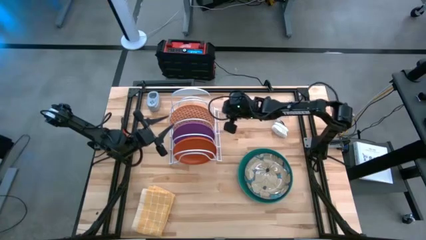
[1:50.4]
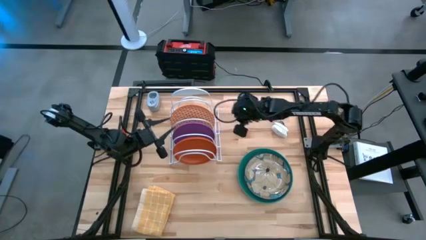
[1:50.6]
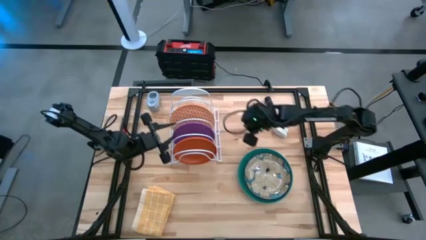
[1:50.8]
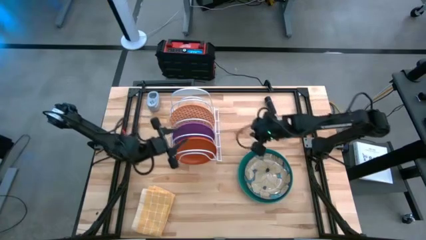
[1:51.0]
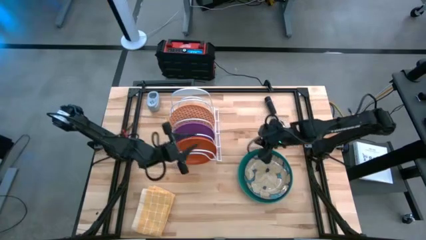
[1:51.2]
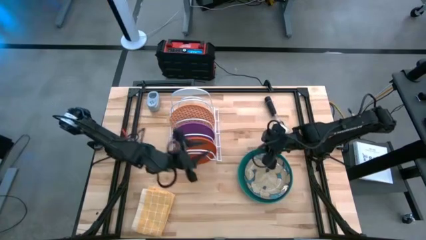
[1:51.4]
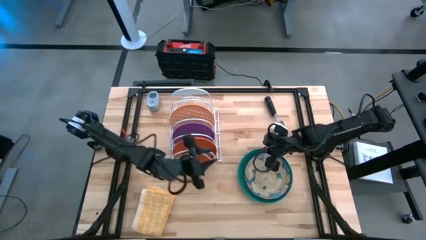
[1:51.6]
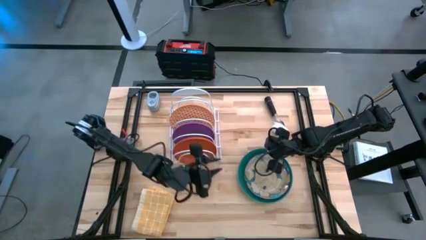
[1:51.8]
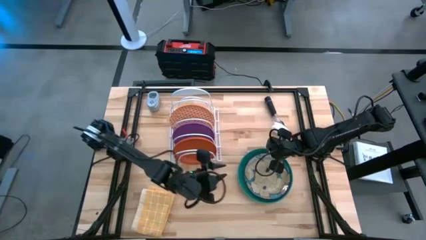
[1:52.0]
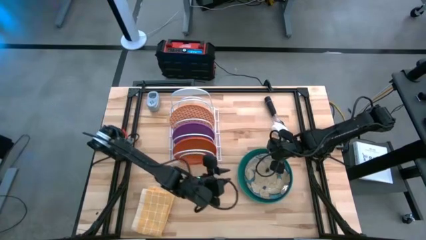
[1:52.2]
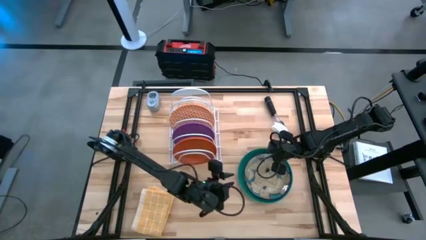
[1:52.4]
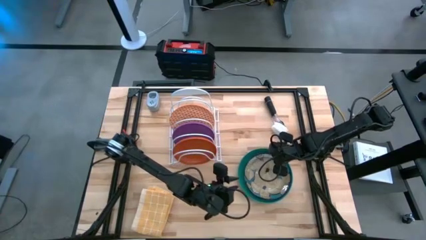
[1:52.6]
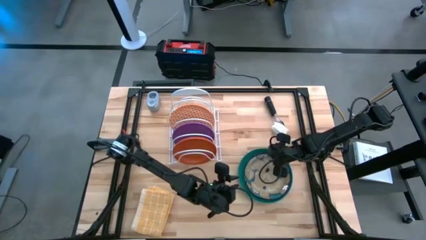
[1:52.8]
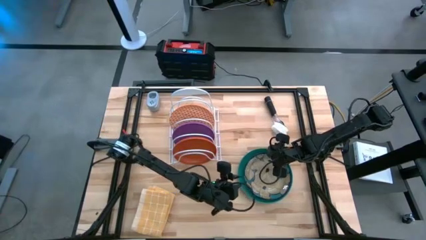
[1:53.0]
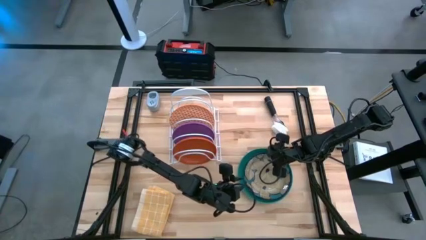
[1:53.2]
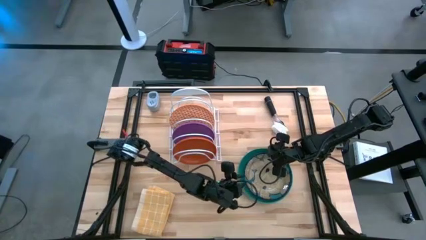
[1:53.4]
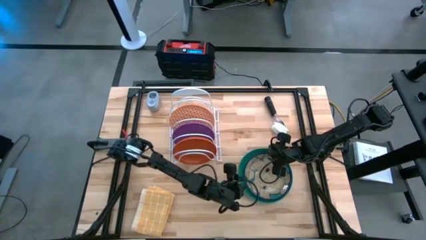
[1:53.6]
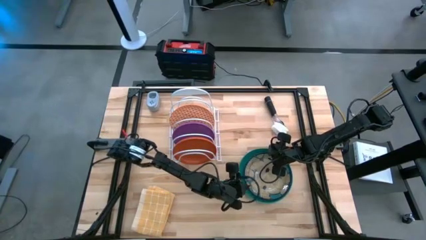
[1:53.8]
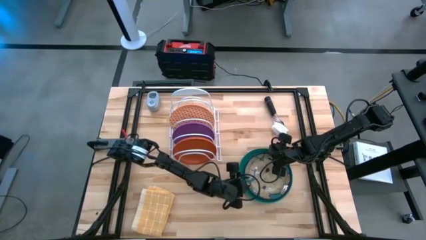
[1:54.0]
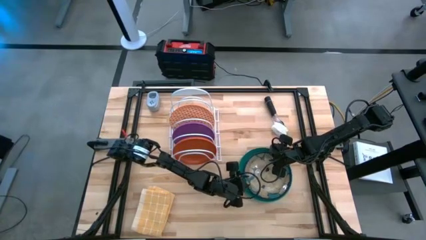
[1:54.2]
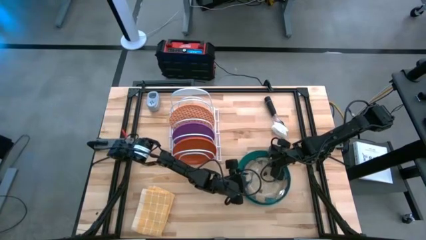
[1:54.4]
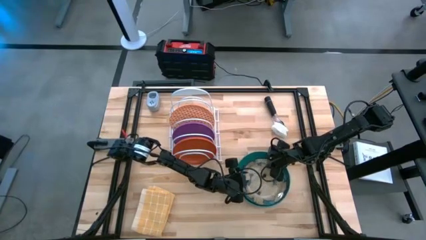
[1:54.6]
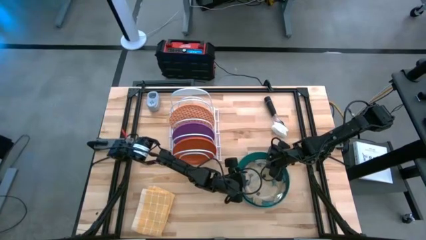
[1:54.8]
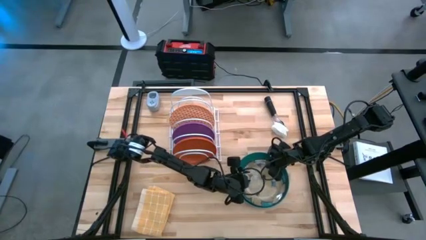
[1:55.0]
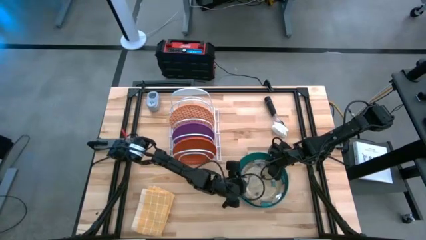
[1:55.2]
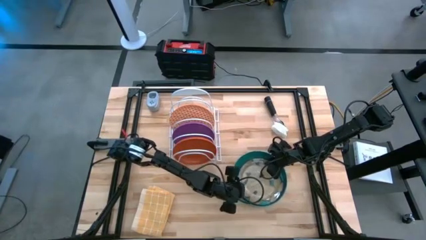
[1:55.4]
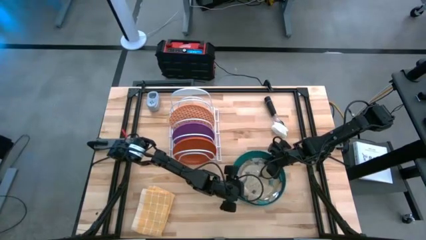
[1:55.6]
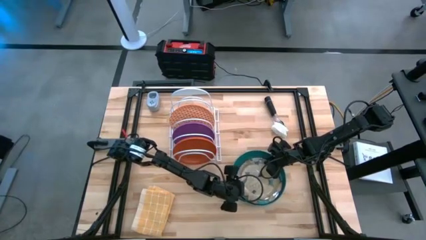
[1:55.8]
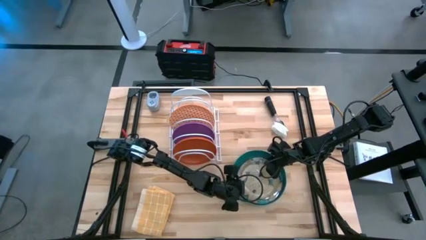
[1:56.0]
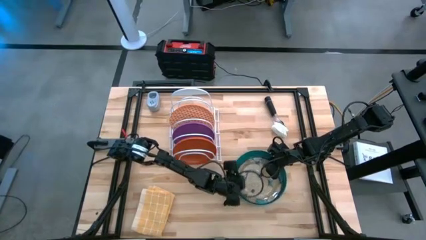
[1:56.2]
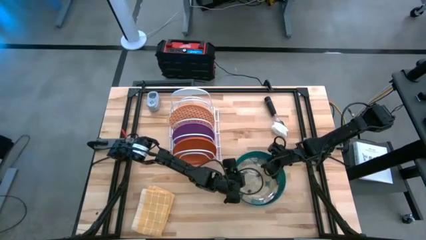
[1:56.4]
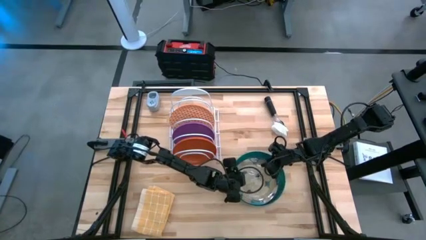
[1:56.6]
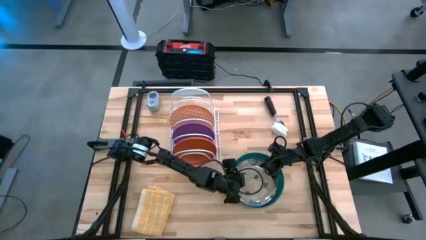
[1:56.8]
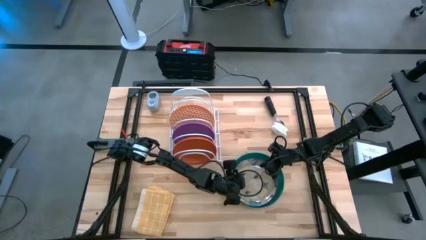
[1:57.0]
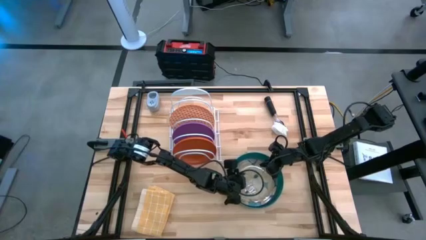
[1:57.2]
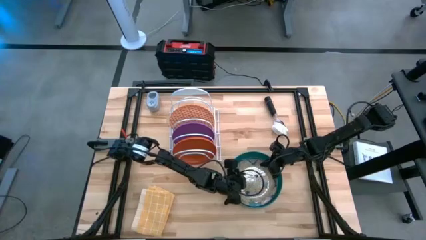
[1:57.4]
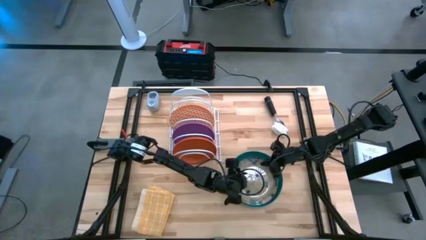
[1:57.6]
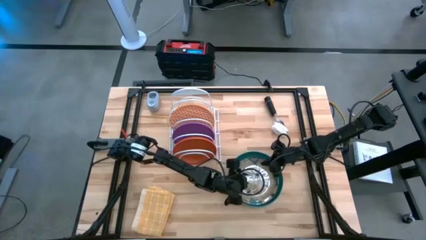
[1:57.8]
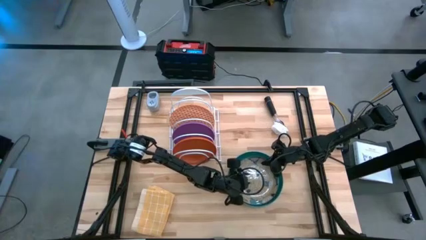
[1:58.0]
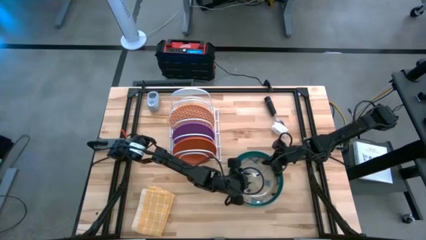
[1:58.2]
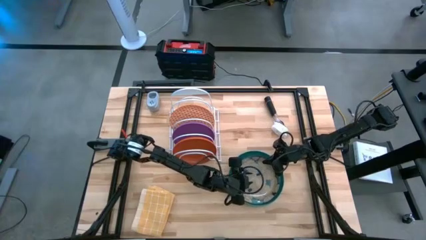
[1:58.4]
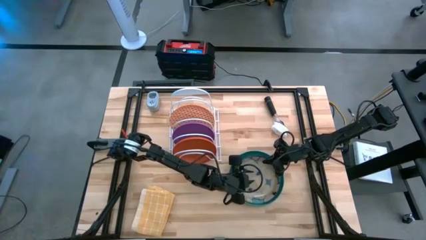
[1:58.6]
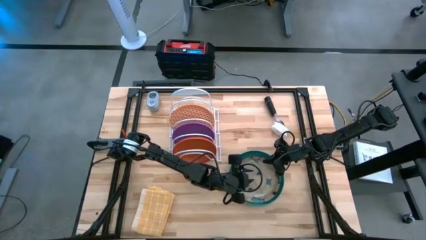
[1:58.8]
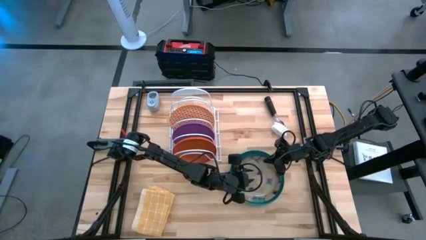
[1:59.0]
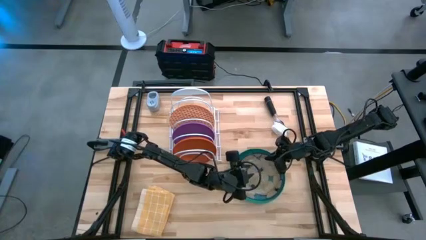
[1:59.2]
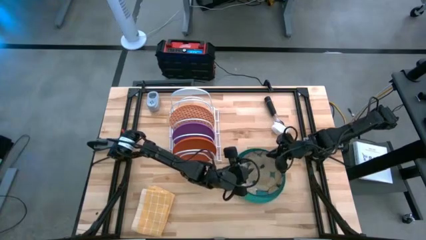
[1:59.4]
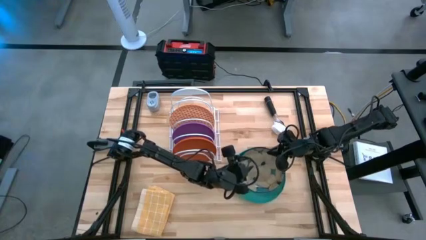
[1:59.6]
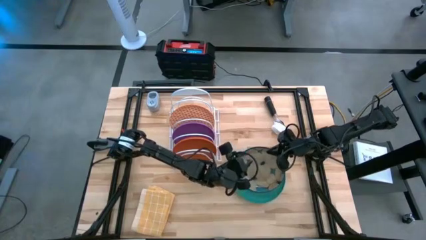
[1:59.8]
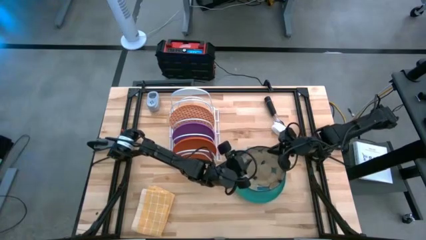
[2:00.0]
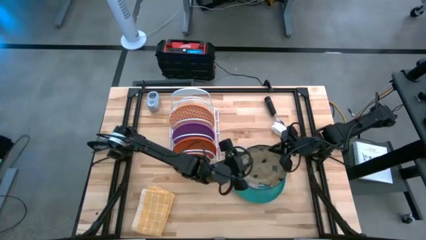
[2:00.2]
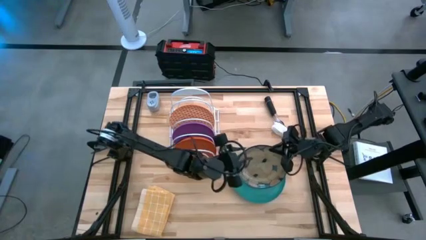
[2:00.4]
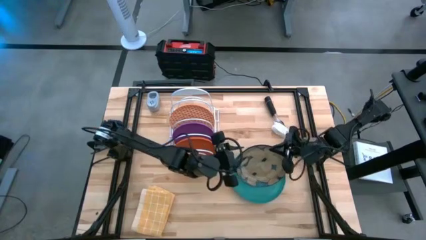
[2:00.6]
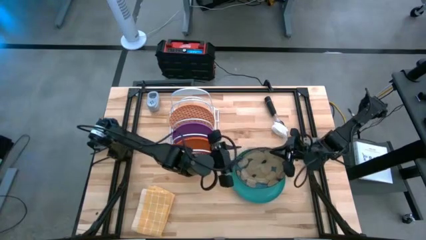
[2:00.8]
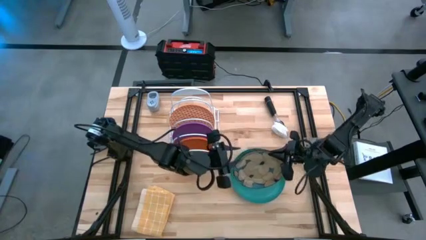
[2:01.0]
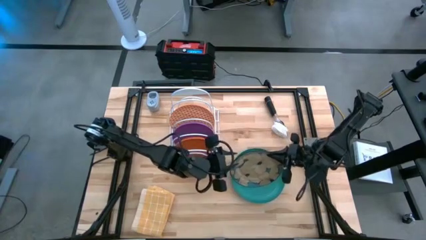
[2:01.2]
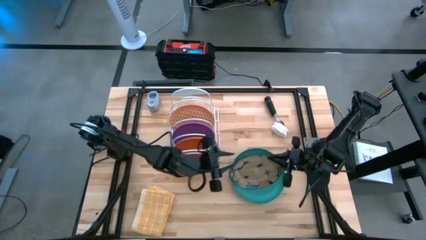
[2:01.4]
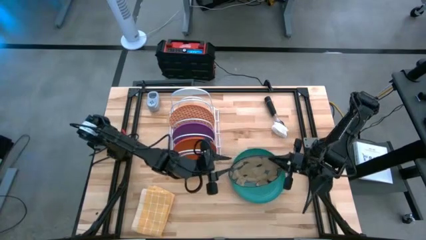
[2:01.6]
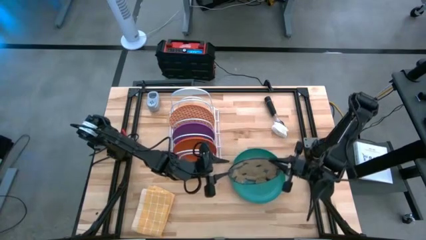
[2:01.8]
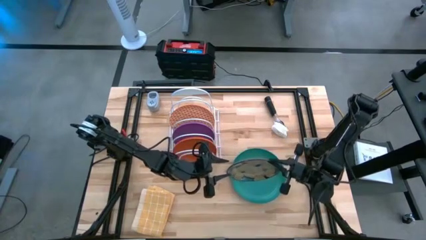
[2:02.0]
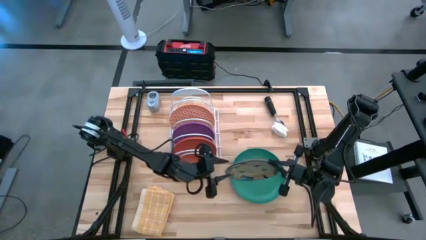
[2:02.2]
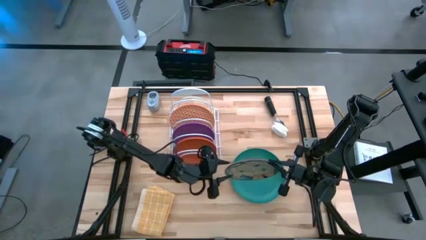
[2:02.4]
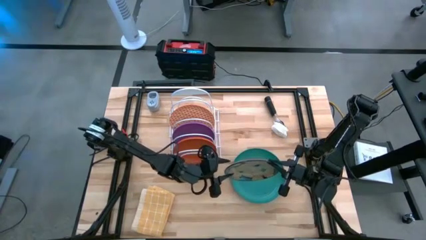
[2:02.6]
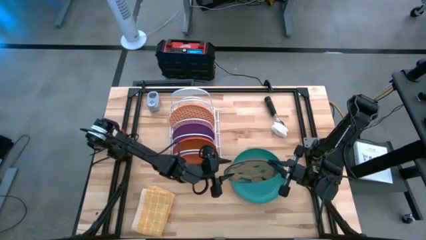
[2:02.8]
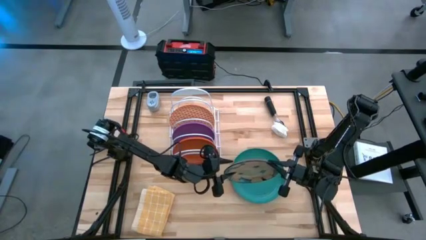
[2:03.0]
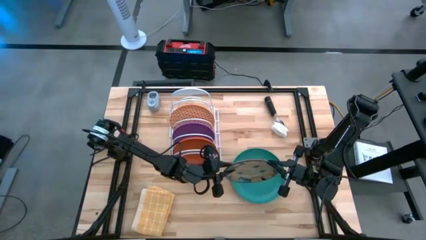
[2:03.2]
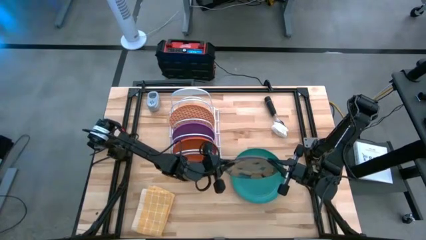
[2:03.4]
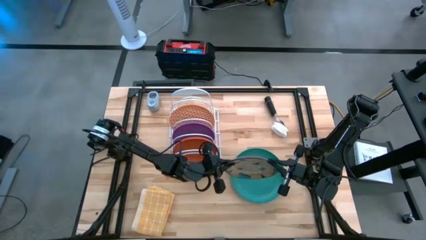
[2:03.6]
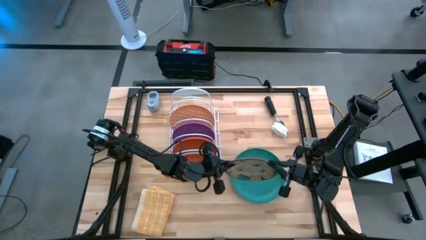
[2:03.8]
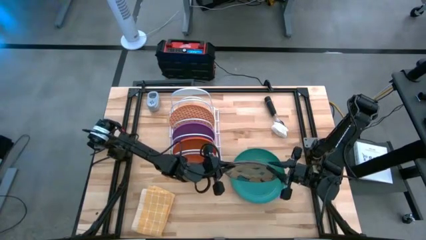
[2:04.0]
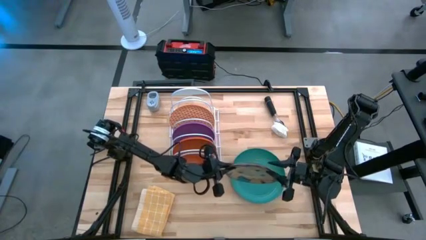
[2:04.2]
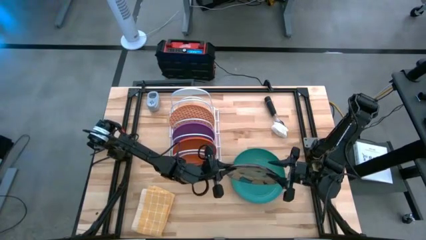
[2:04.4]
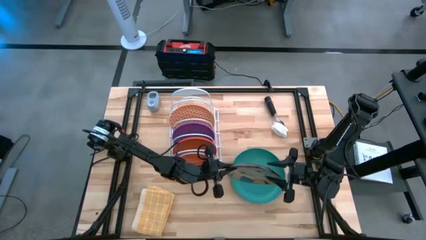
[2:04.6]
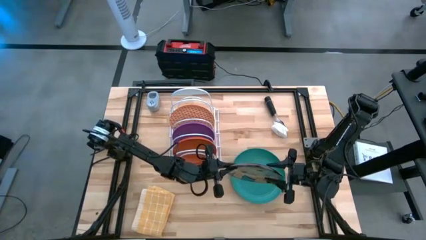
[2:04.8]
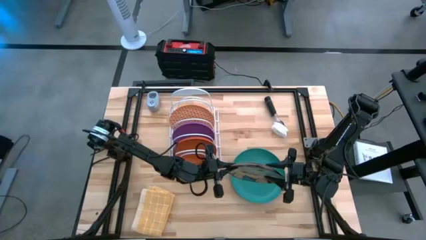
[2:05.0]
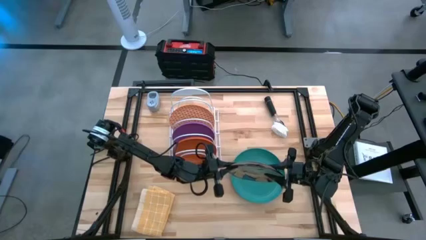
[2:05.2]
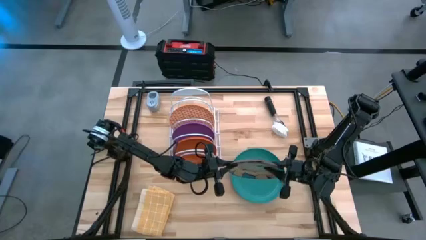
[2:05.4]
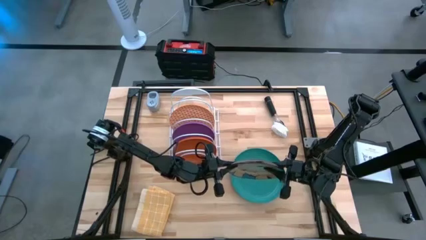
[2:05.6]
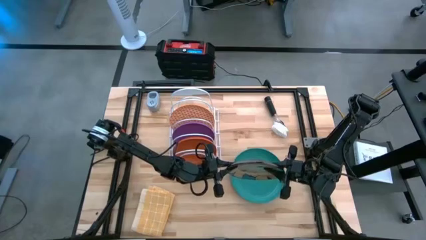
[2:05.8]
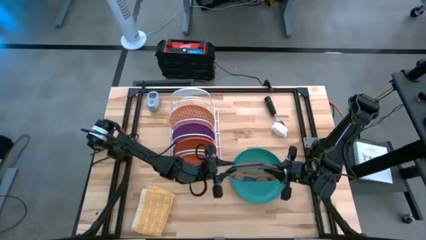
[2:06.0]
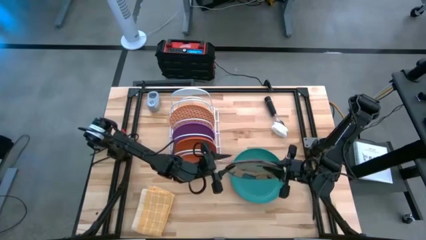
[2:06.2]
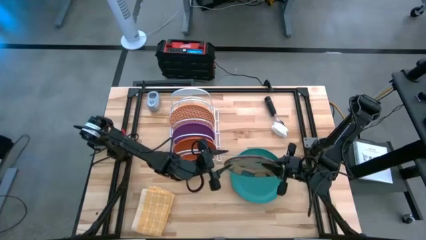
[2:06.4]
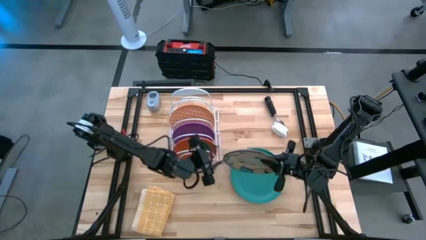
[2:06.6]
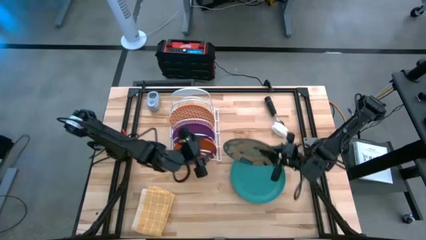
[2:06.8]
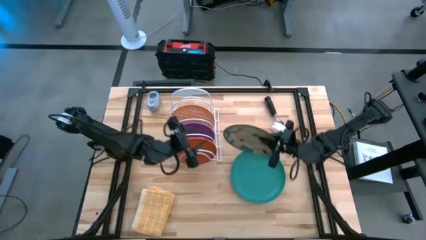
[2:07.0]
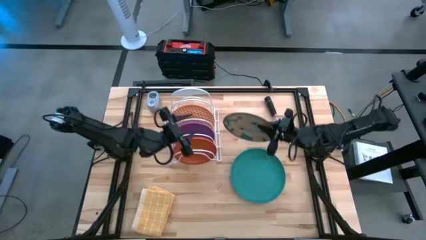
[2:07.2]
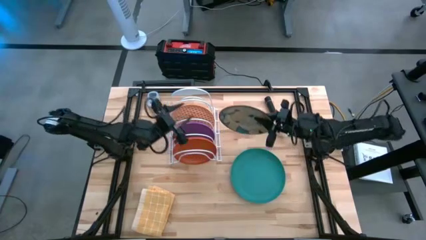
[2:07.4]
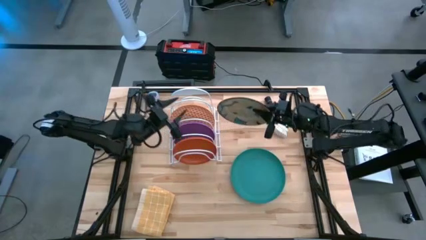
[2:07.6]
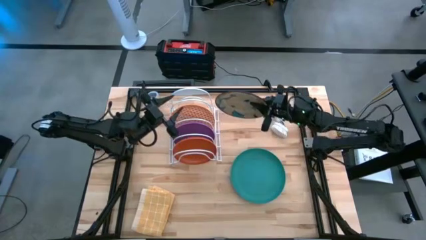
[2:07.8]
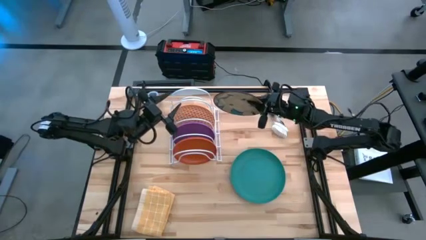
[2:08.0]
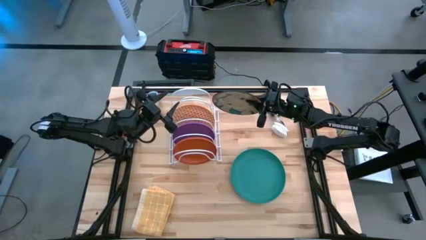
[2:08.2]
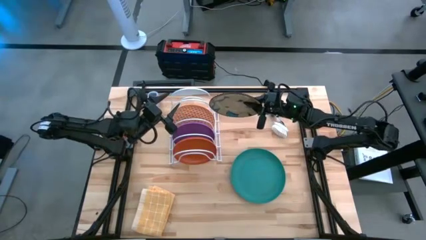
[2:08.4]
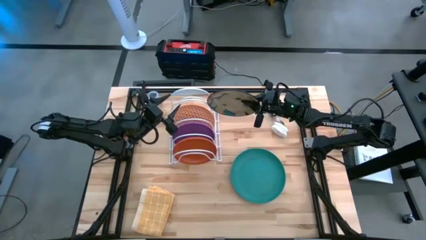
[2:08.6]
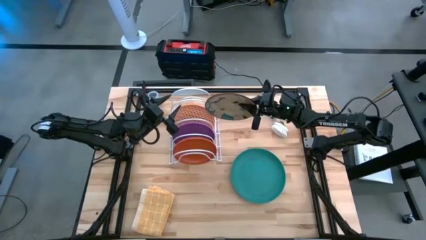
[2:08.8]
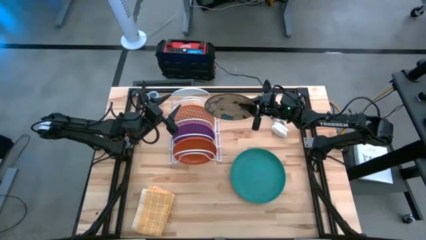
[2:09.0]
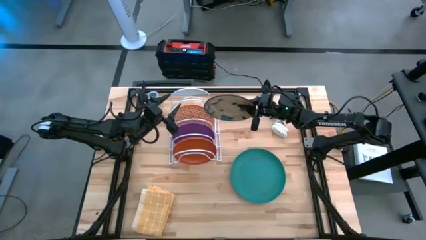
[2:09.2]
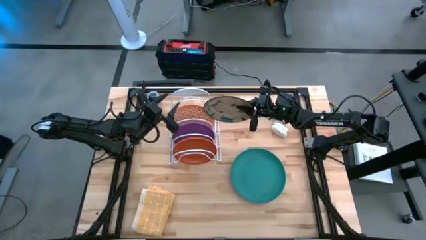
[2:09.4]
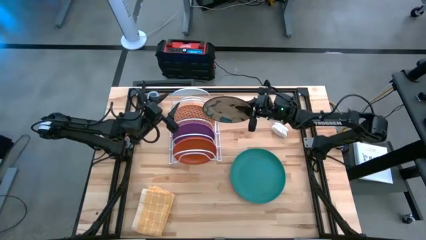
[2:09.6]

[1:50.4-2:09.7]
Task: Sort dishes
Put the white/blue plate into the dish rack
